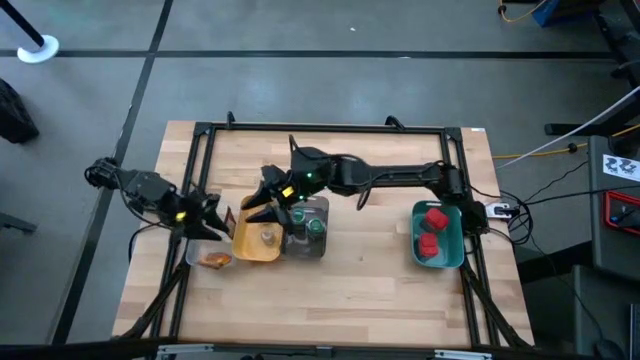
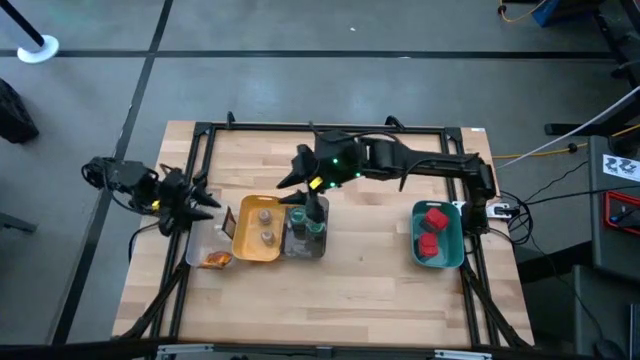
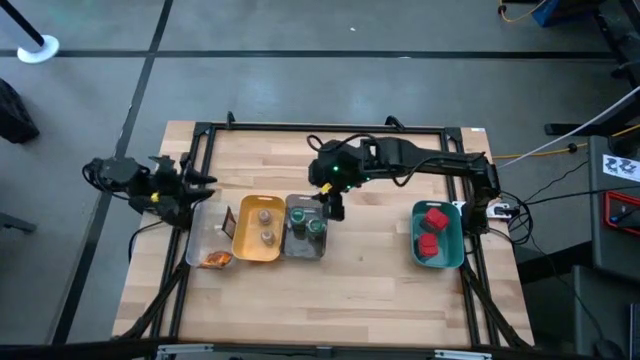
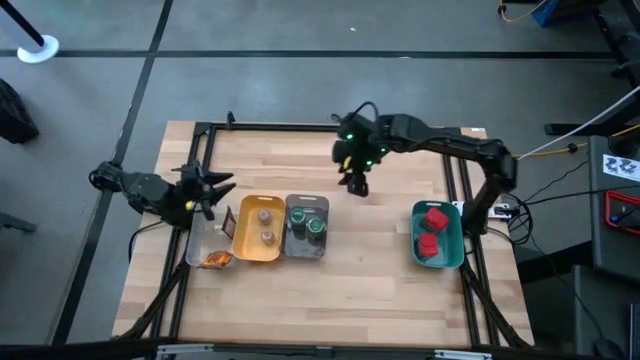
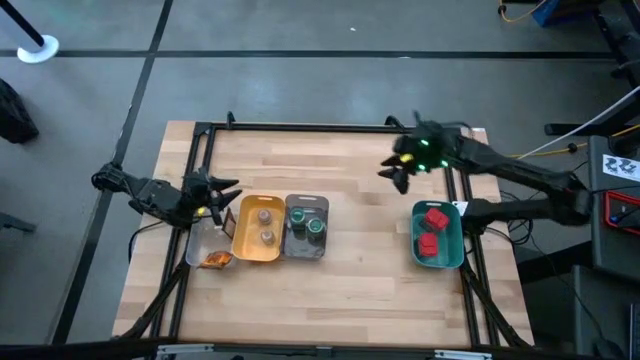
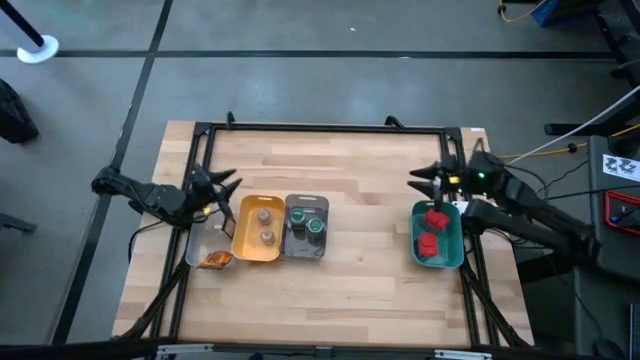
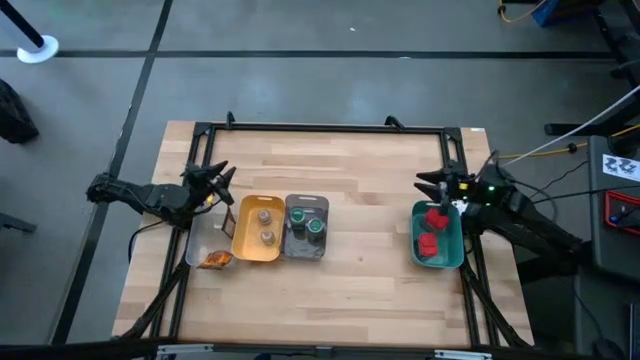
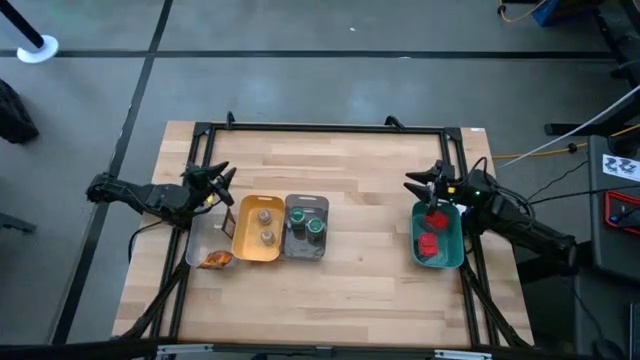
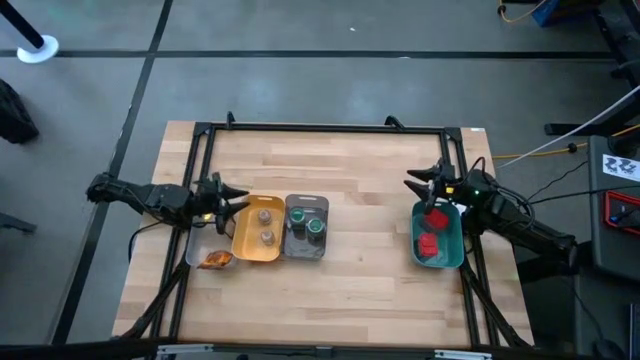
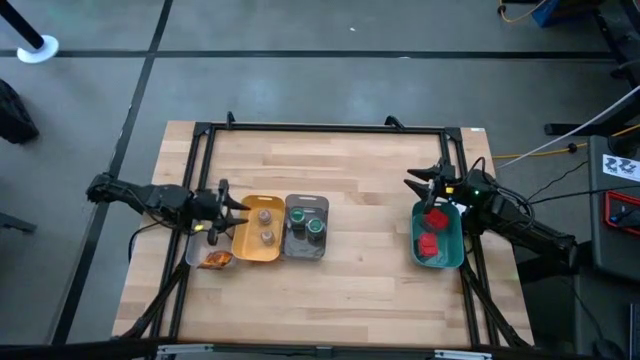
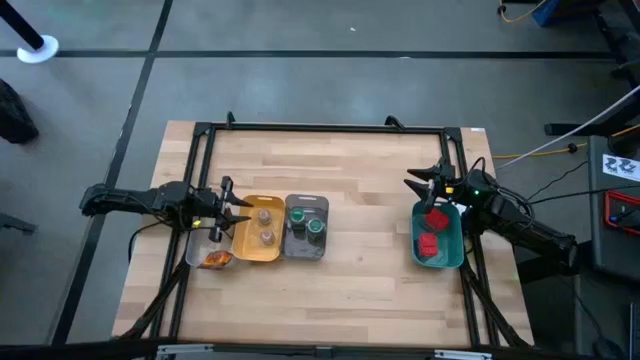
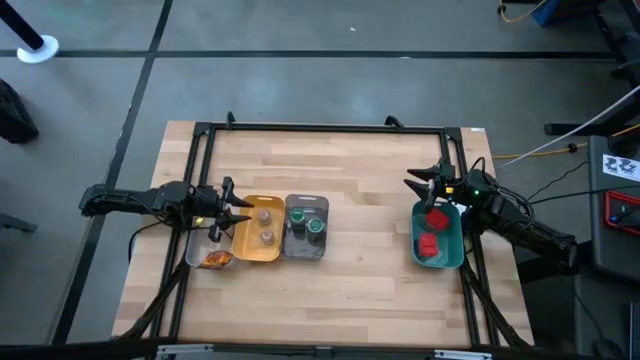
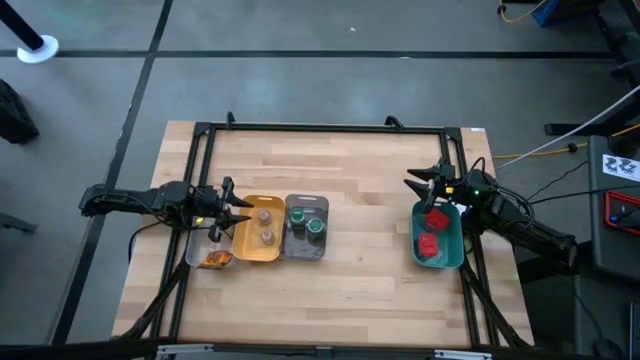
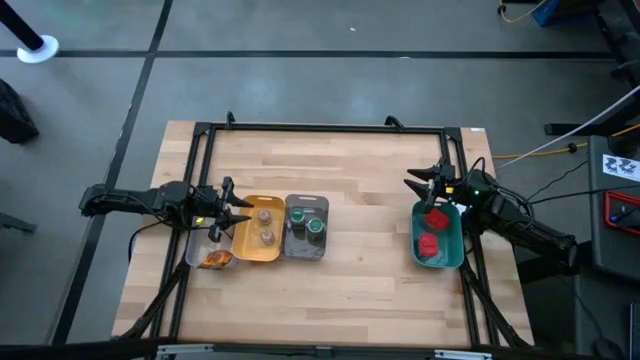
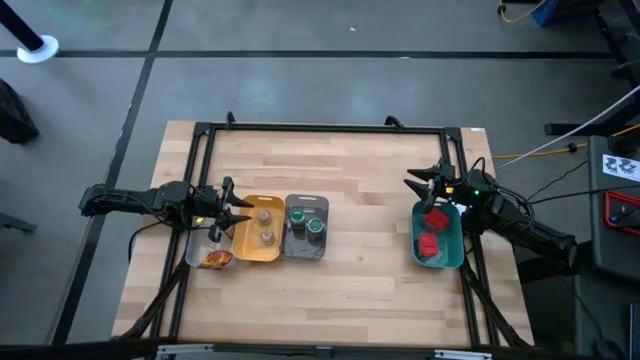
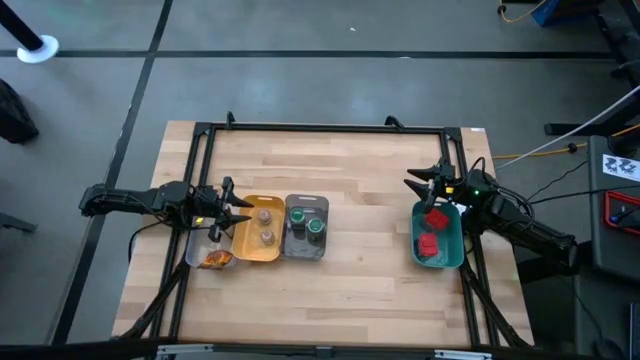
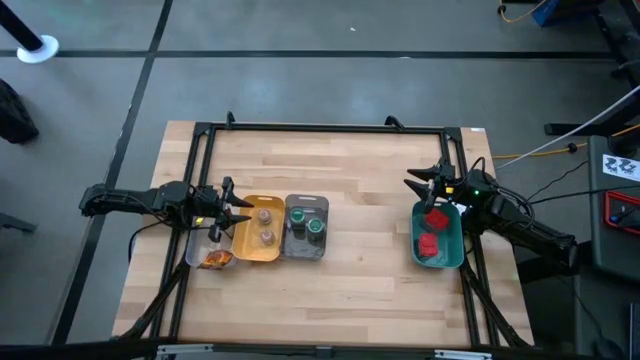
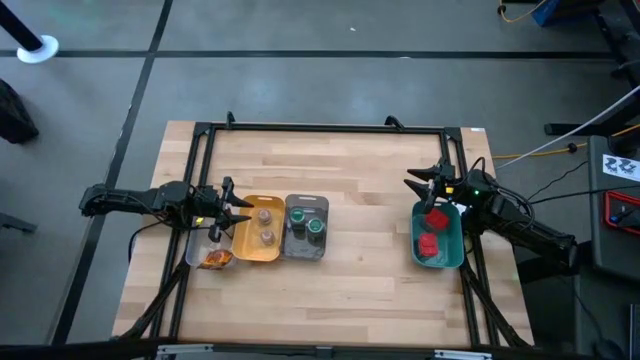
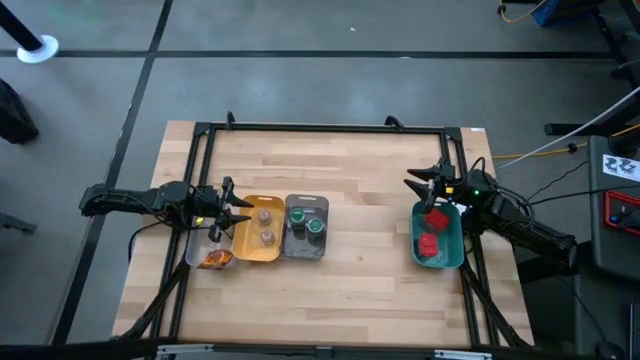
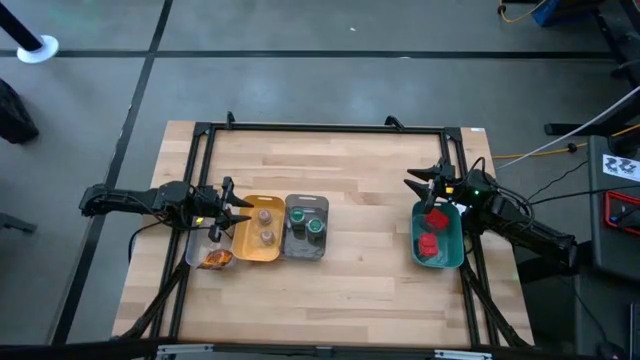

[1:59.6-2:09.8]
Task: Sort spices by type
Return to Home Position

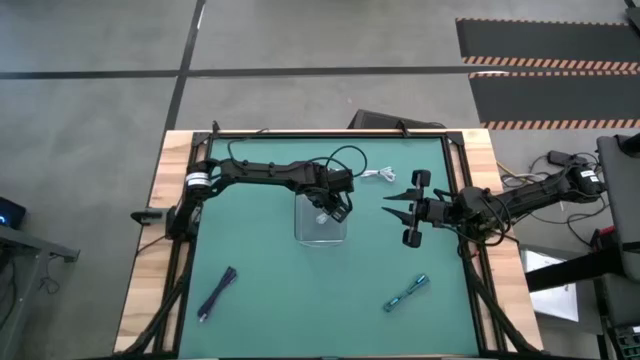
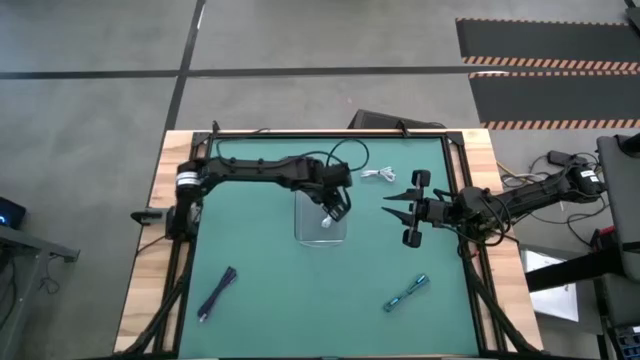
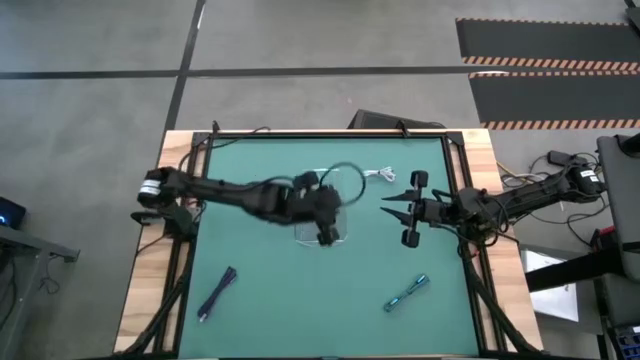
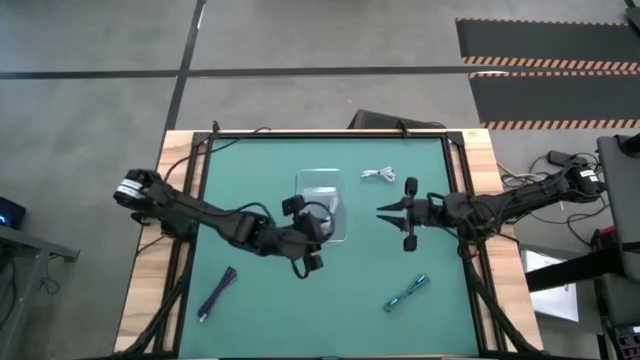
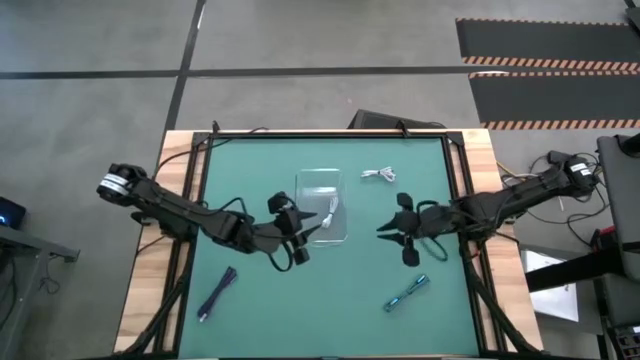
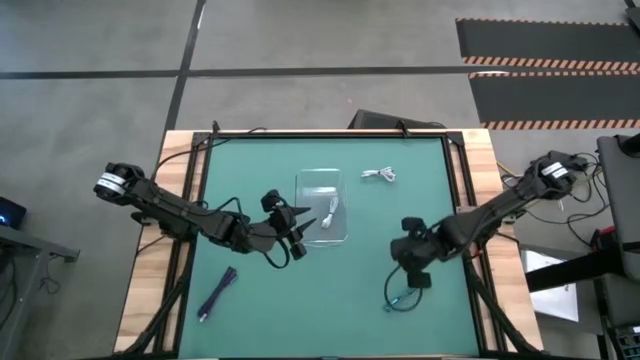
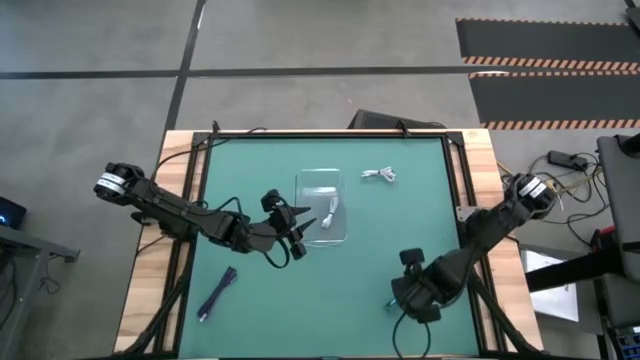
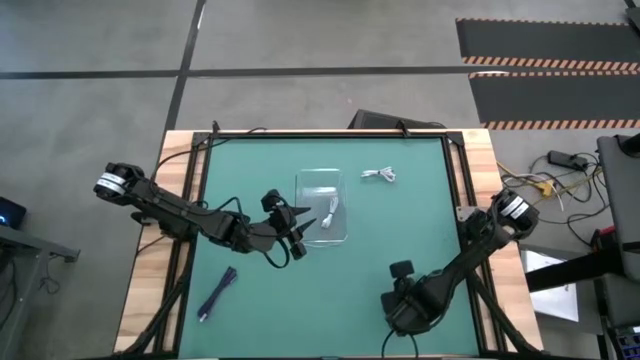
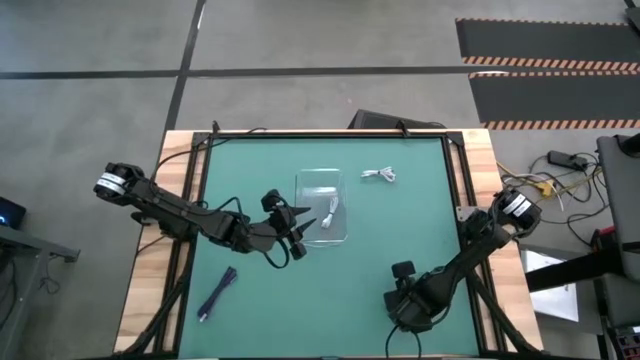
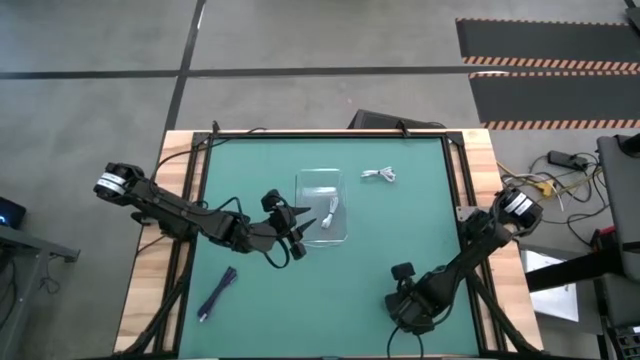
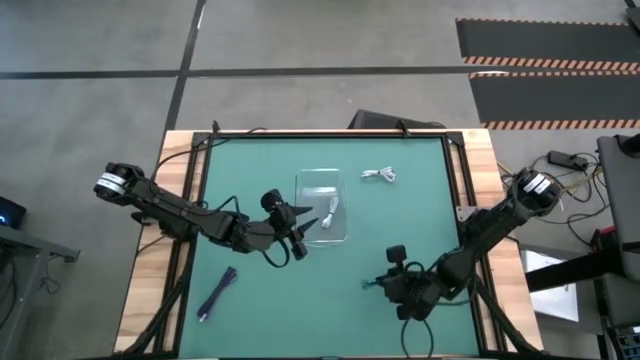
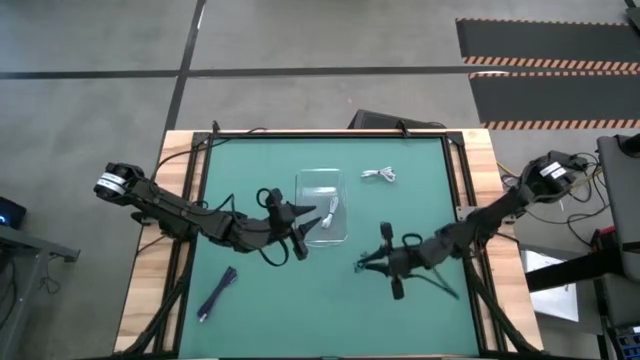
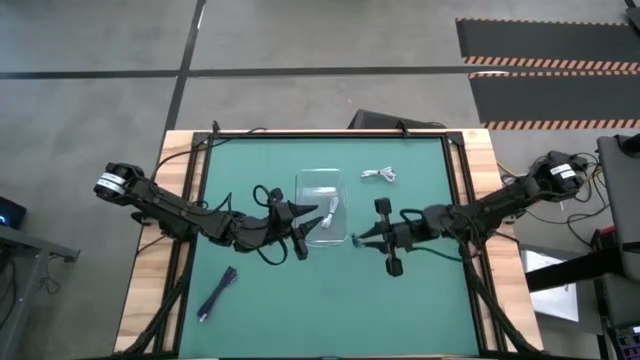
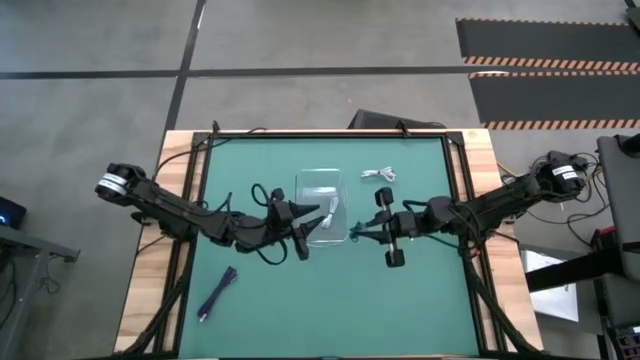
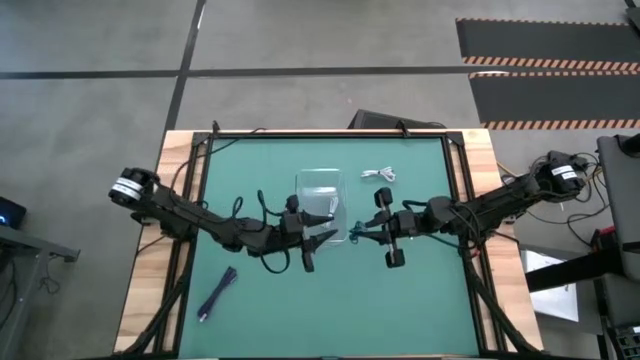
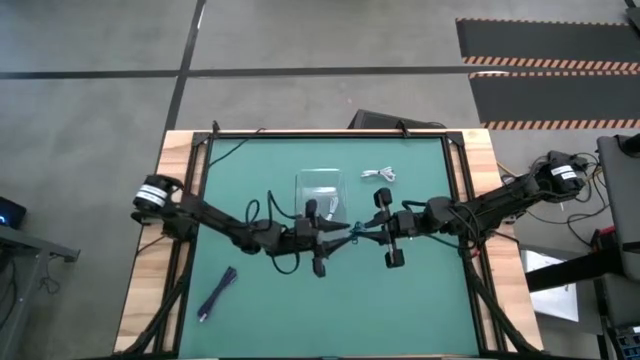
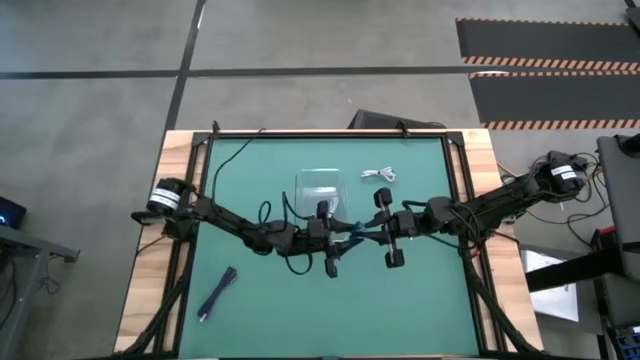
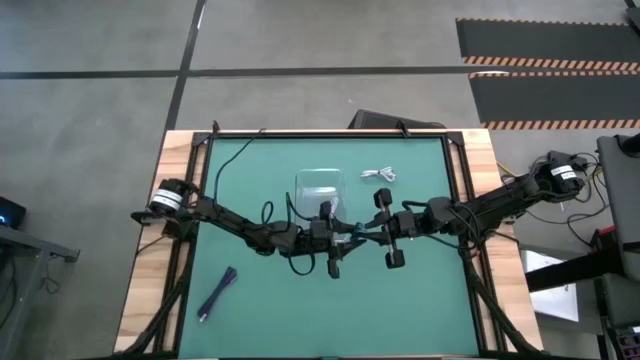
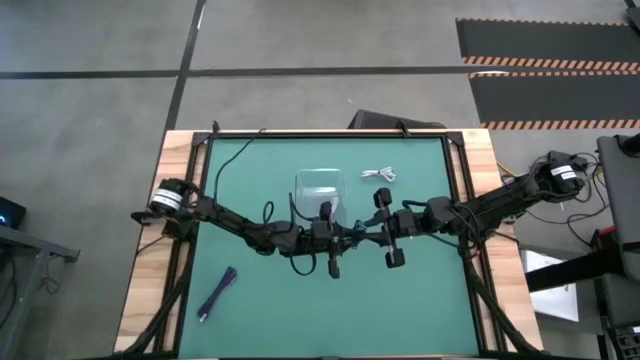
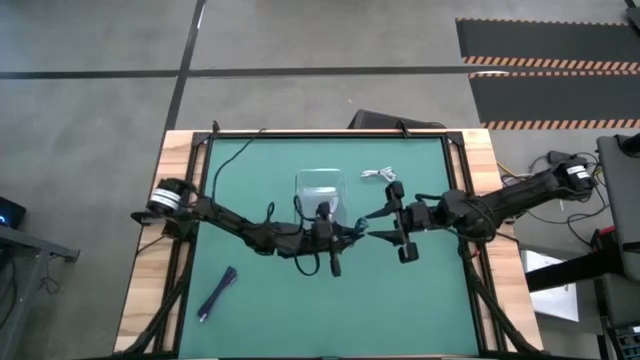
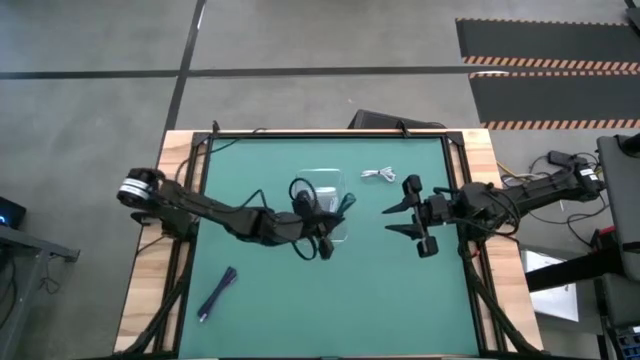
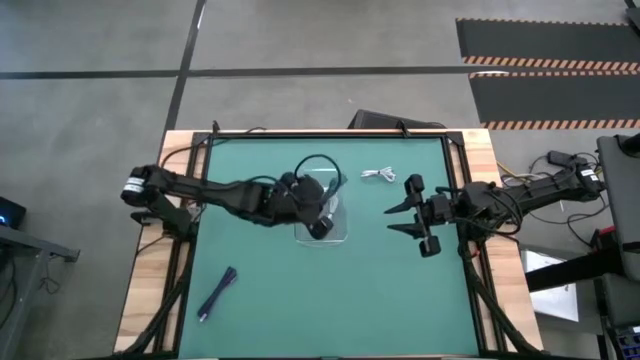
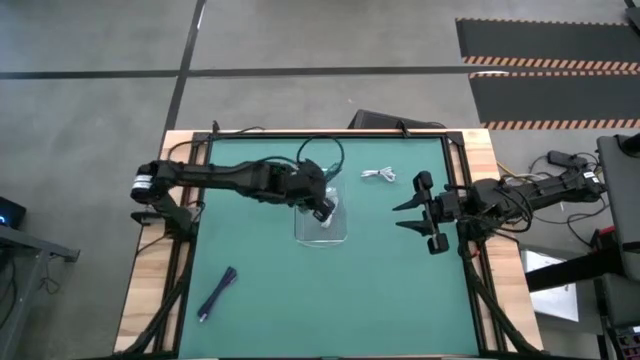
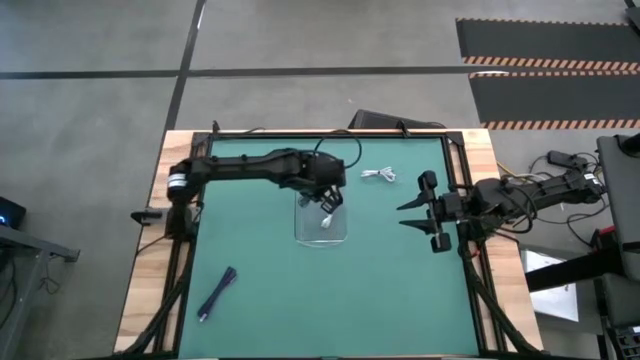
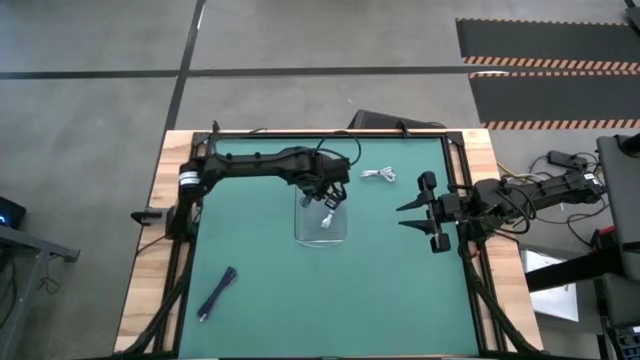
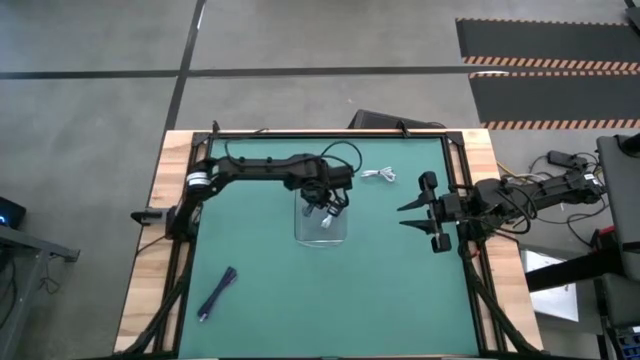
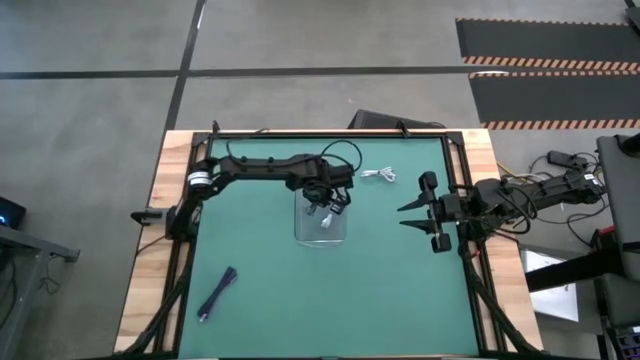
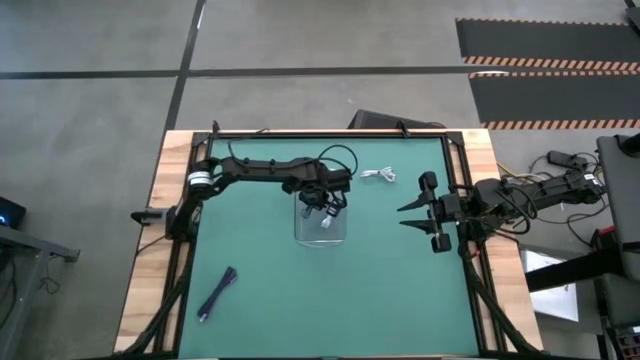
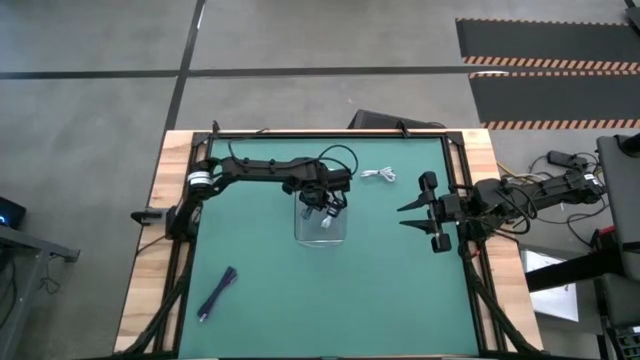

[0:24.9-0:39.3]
Task: Pick and place USB-C Cables
Put the blue charger cable into the transparent bin
